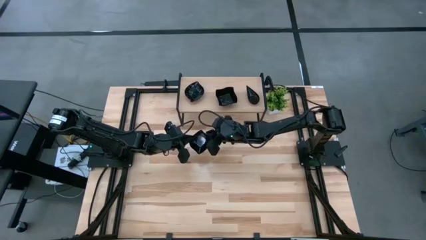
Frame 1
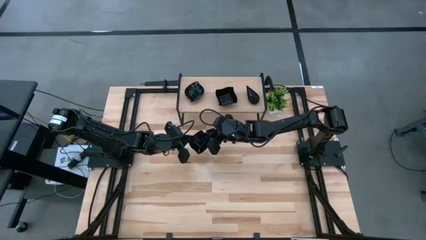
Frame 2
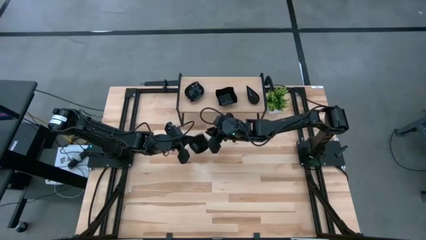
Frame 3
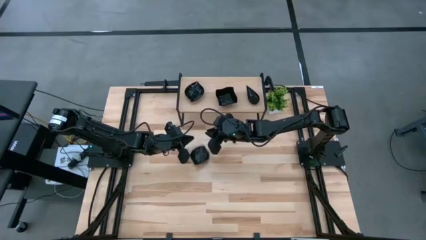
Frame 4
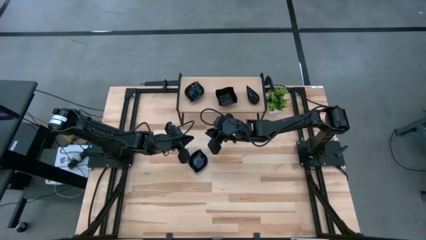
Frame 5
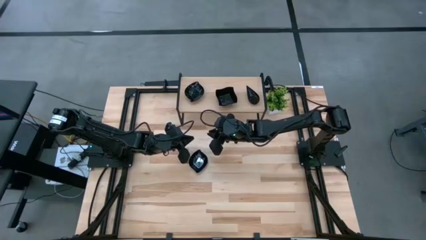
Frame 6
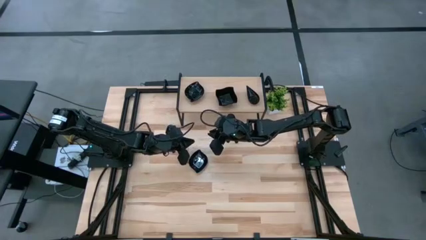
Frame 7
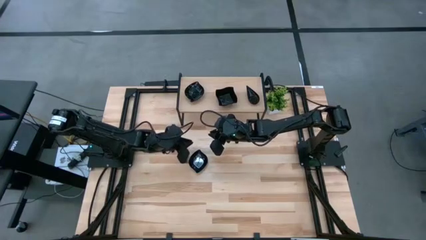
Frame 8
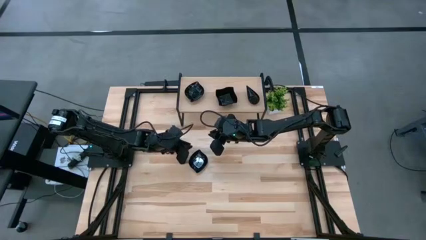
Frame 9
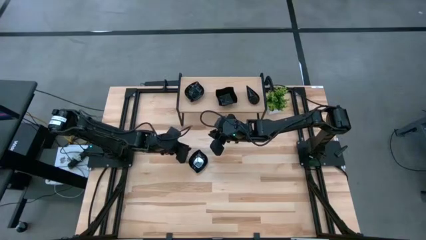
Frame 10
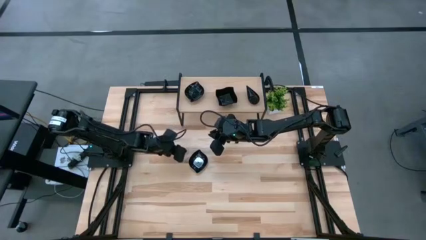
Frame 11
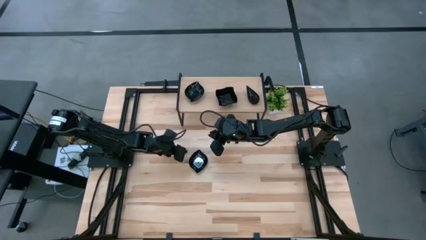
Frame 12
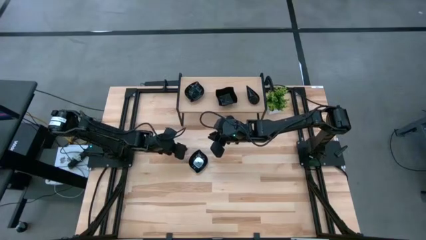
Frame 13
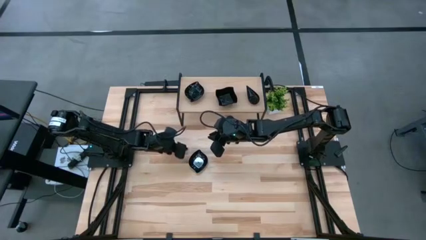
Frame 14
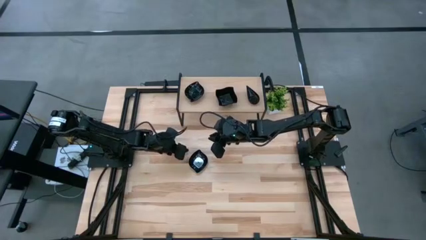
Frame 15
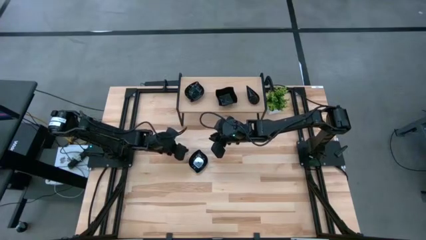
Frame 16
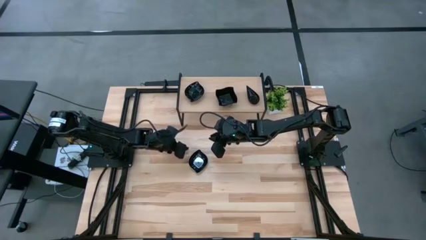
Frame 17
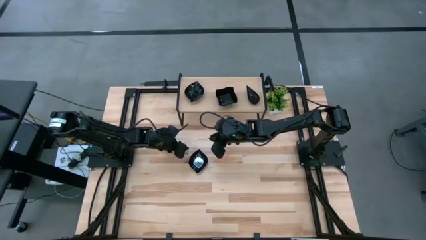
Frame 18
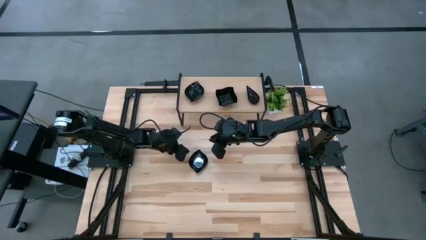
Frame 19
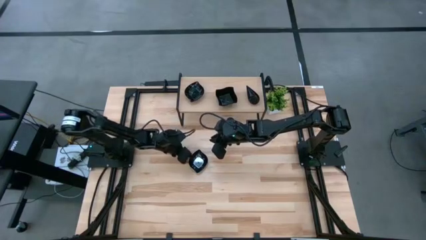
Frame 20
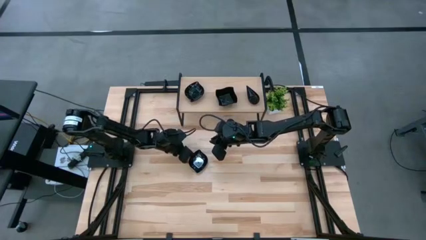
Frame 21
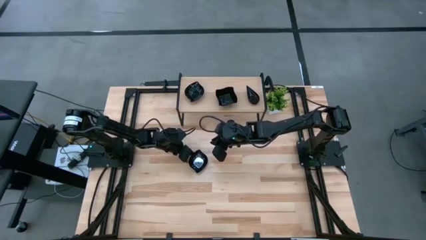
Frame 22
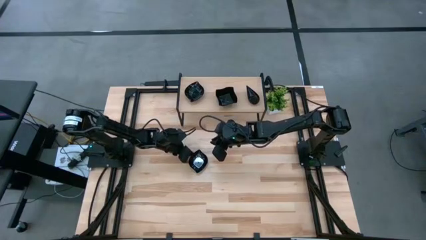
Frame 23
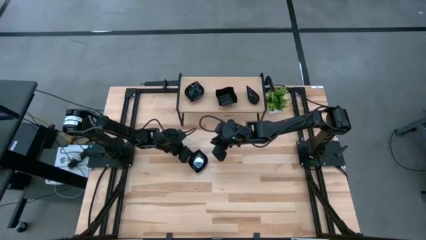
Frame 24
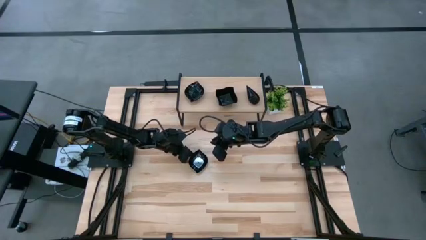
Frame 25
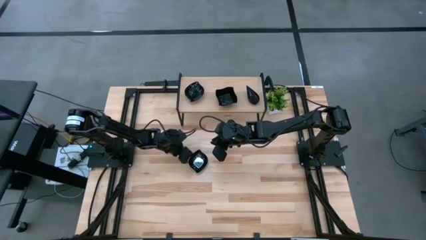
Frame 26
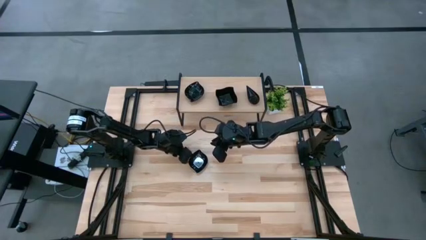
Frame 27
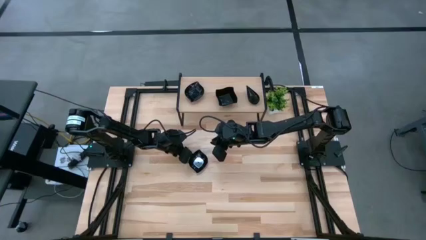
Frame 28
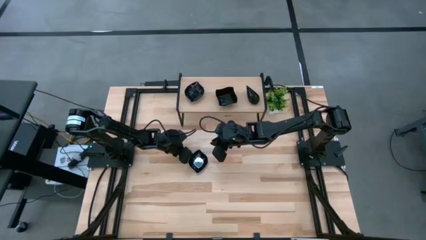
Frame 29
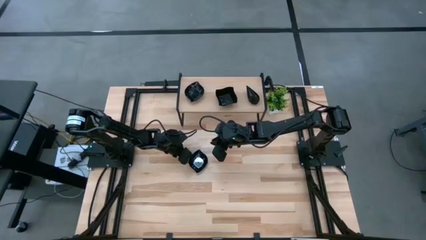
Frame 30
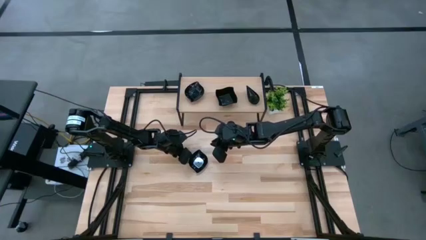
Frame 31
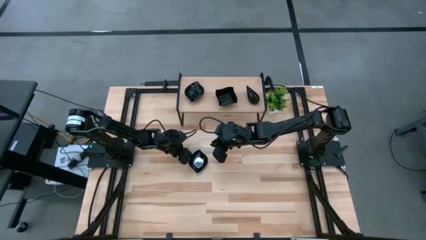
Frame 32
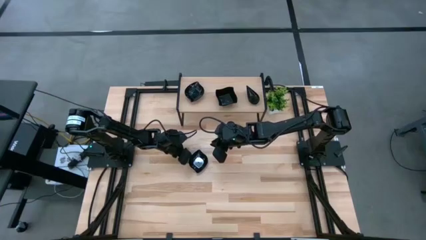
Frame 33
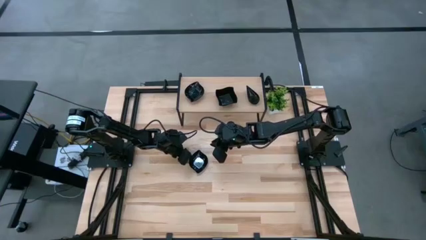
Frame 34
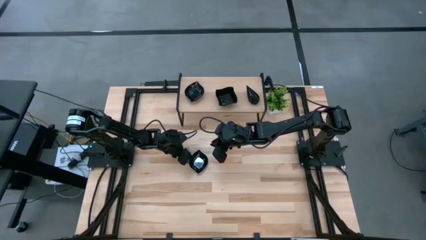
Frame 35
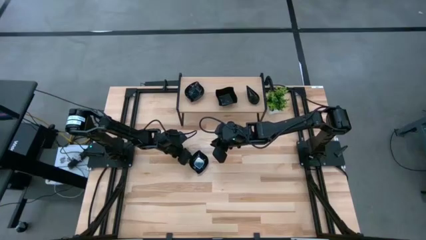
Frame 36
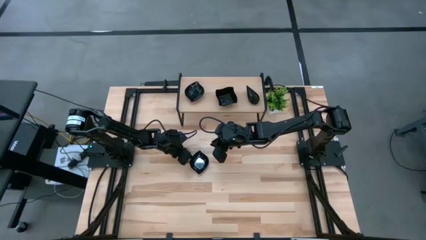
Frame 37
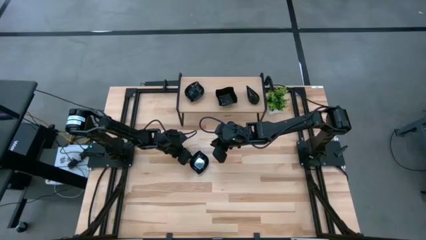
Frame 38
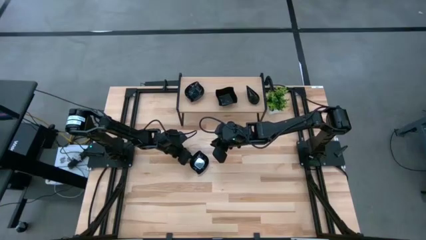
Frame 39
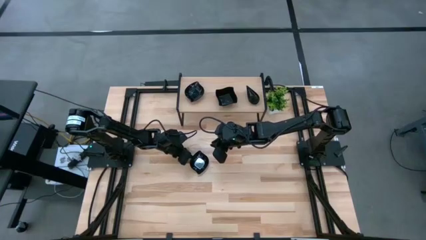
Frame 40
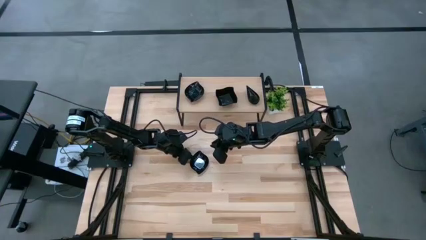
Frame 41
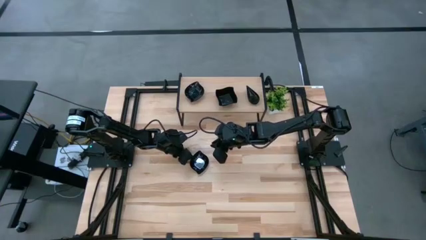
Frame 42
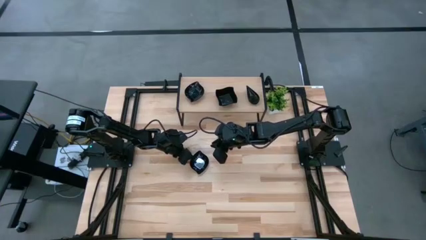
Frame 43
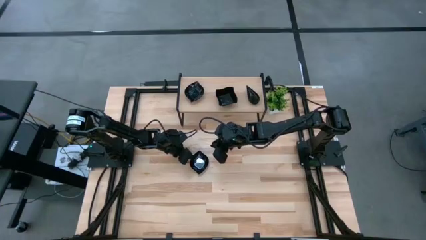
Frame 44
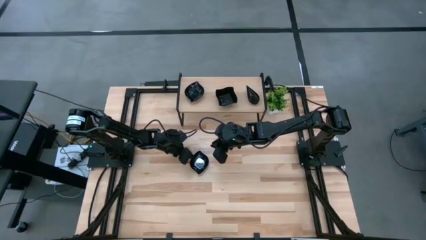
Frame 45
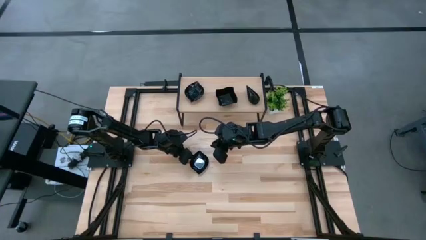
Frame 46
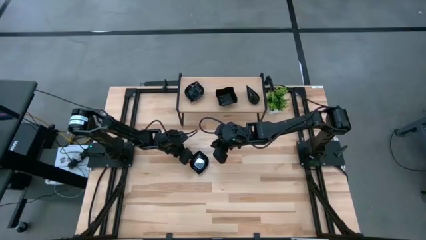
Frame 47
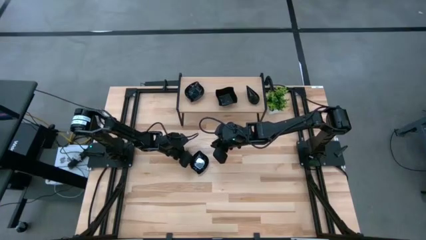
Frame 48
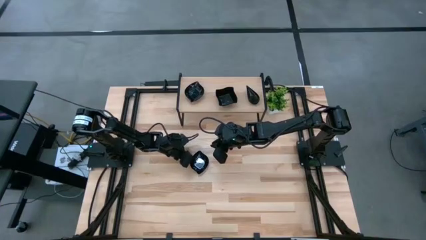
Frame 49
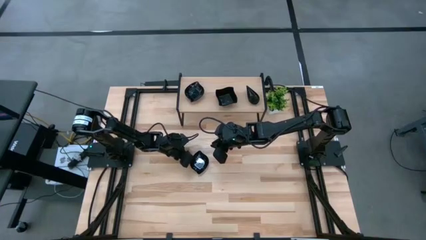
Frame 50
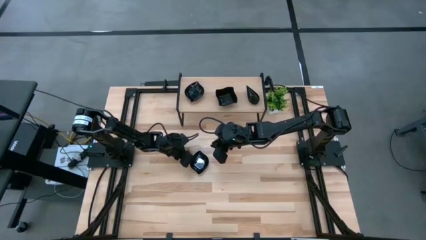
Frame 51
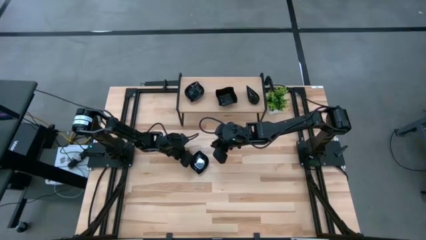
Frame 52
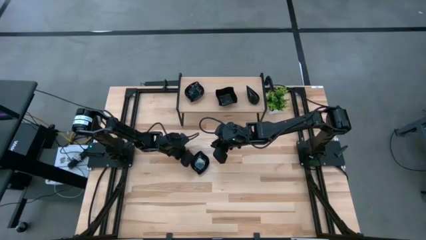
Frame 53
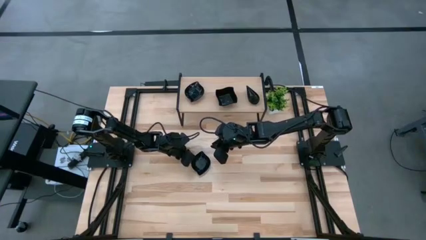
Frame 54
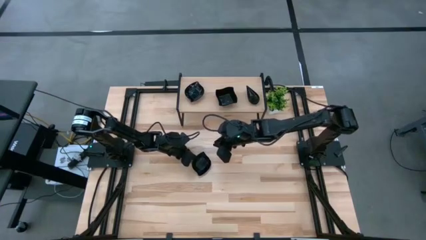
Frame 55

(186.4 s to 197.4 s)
Task: Pick & Place Mini shaped plates
Stack the black leaf shaped plate on top of the black leaf shaped plate on the shelf

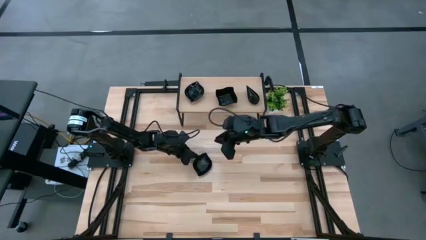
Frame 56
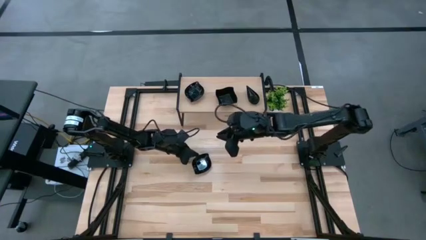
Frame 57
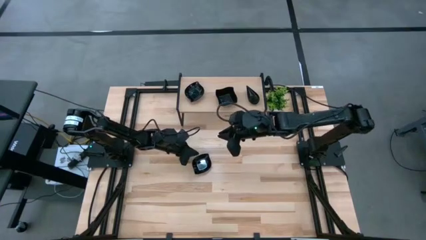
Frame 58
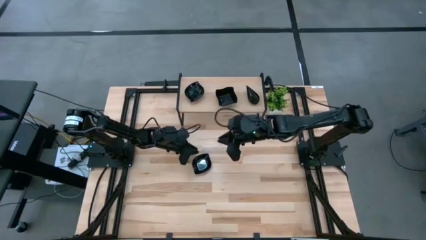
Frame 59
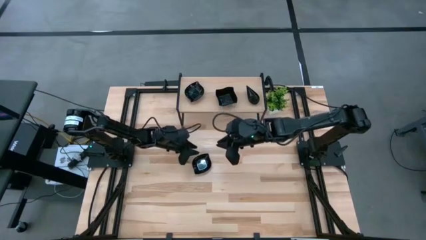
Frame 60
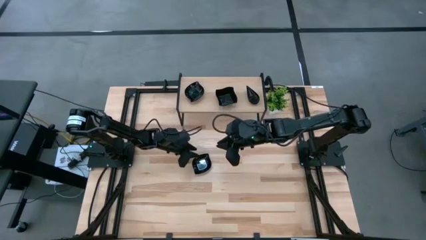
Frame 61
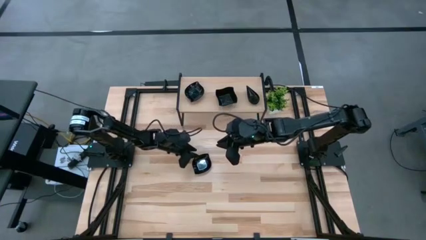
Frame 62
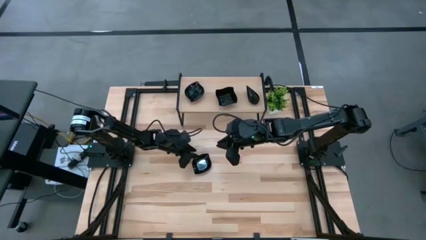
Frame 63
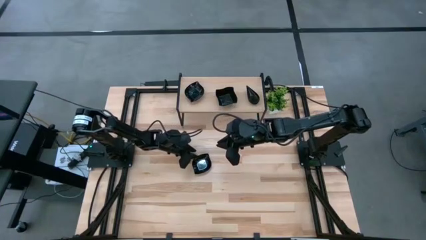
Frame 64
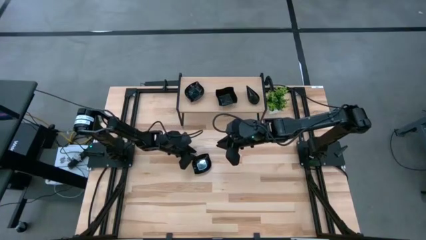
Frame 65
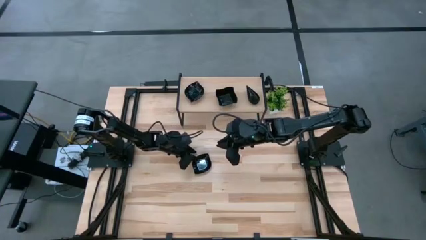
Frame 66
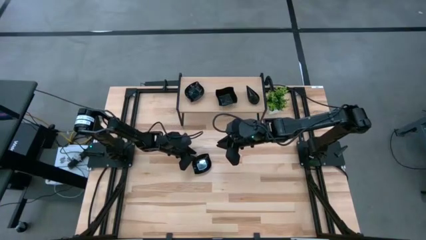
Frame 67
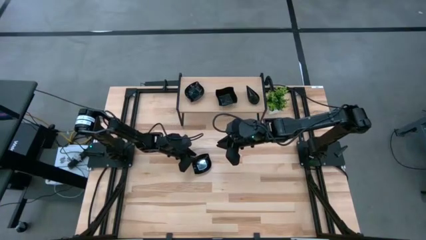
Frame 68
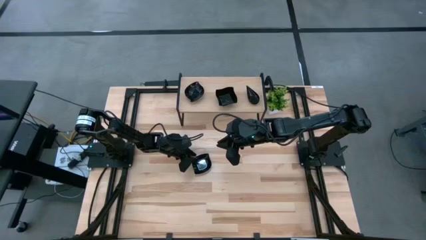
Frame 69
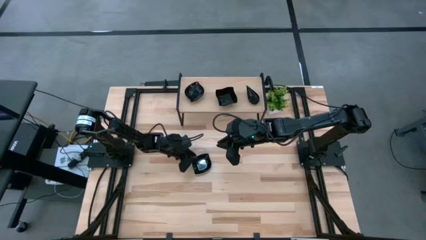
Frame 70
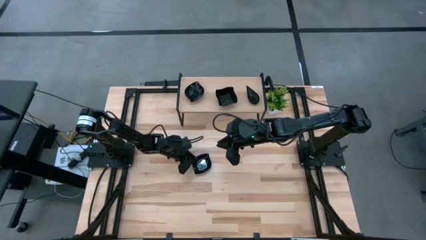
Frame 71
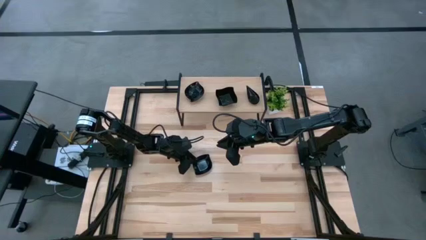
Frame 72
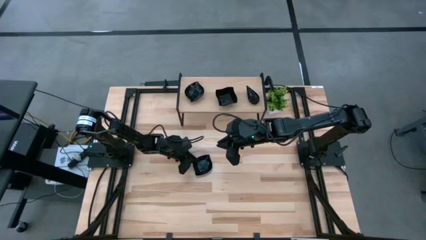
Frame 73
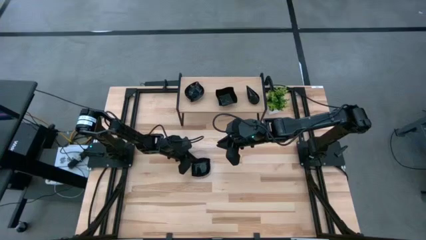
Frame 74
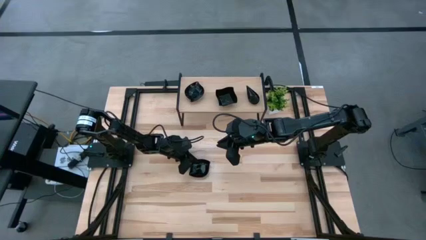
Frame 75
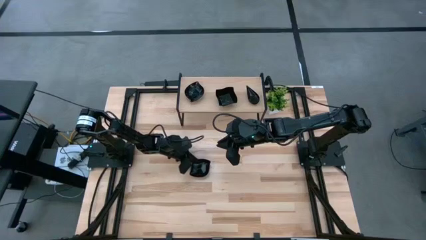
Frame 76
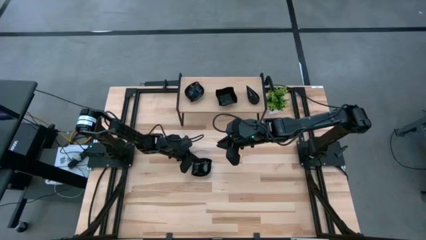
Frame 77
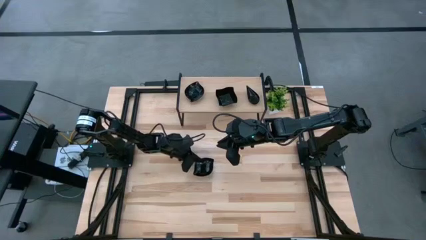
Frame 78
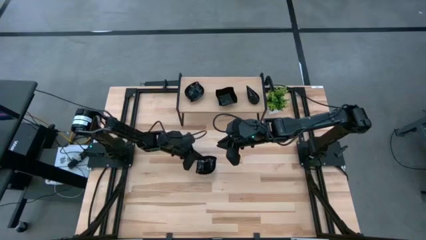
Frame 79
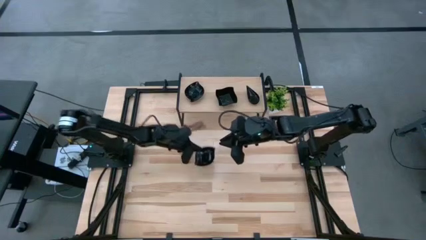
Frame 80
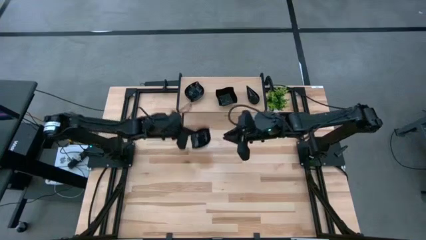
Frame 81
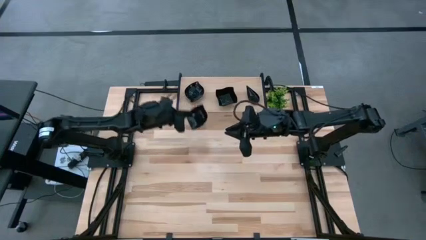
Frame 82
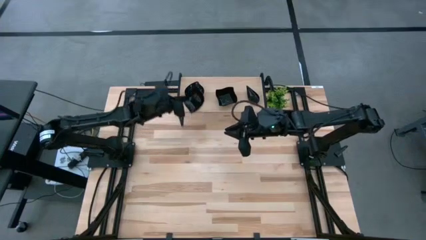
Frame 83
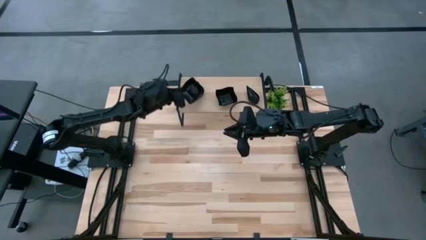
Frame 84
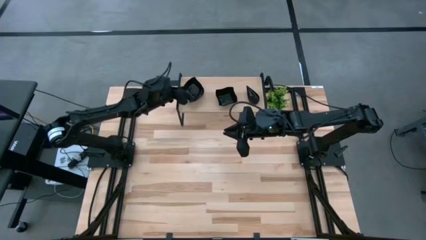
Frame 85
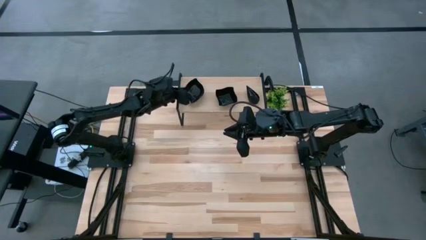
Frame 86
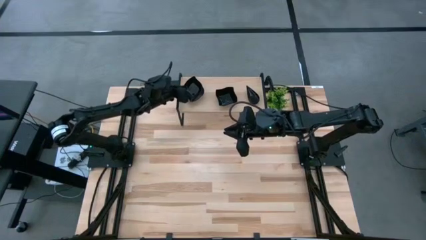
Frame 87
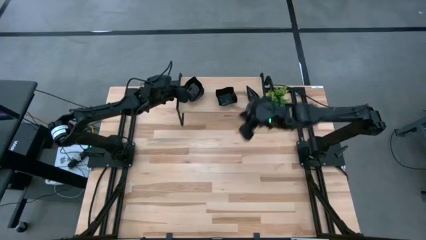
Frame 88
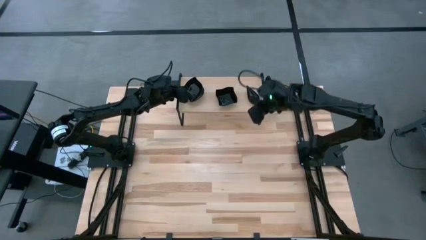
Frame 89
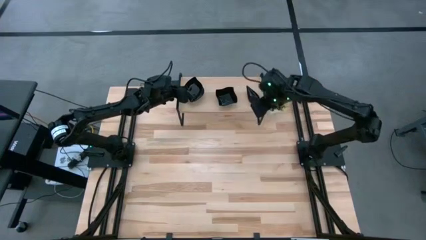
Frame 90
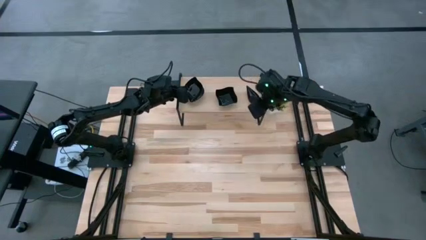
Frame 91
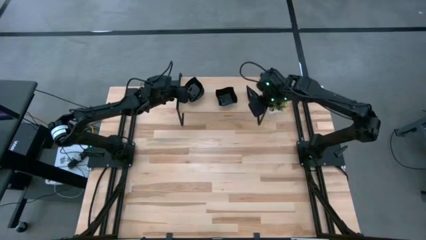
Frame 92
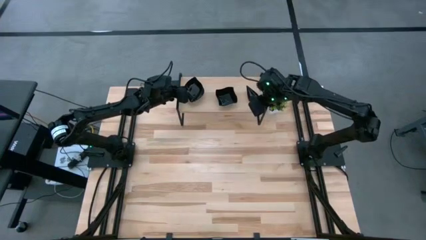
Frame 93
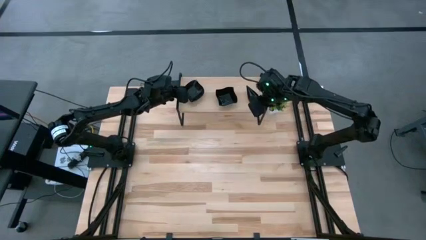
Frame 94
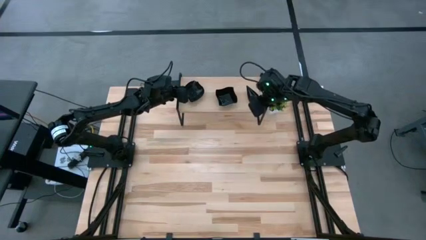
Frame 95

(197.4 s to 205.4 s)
Stack the black leaf shaped plate on top of the black leaf shaped plate on the shelf
